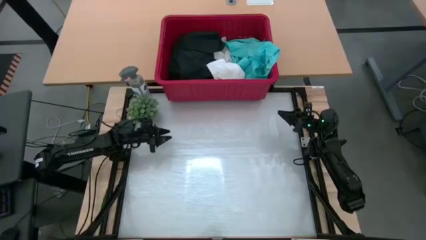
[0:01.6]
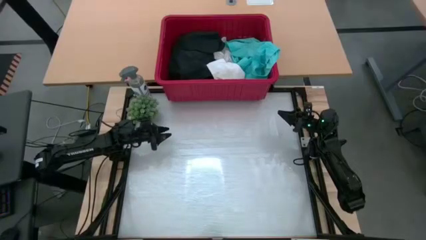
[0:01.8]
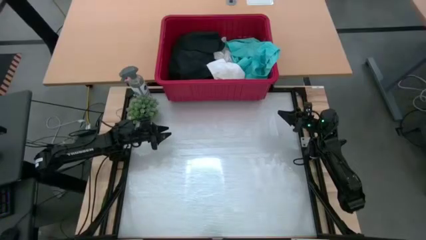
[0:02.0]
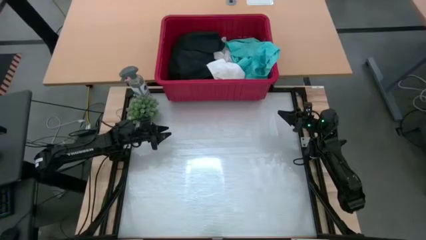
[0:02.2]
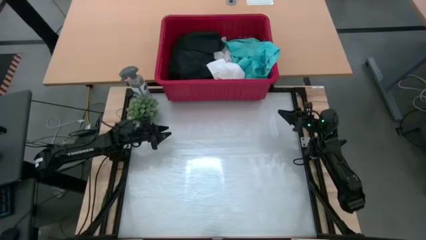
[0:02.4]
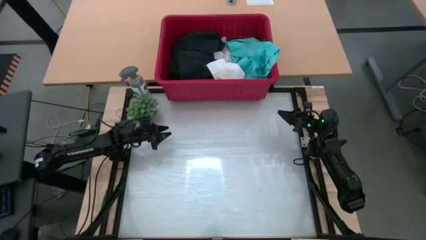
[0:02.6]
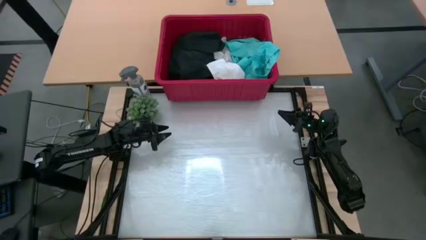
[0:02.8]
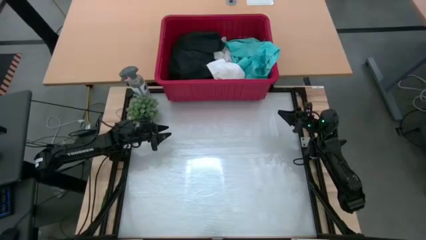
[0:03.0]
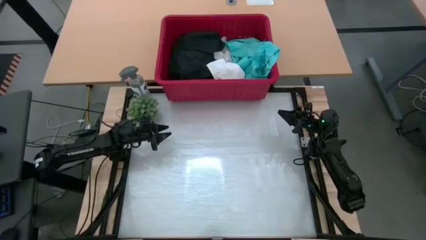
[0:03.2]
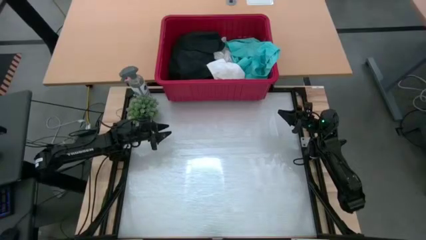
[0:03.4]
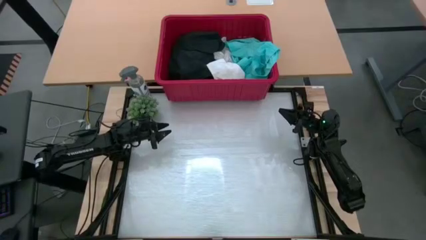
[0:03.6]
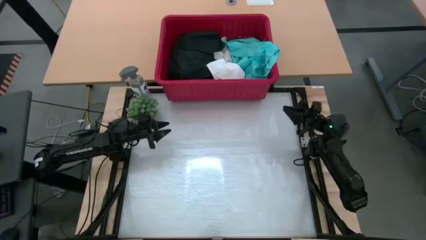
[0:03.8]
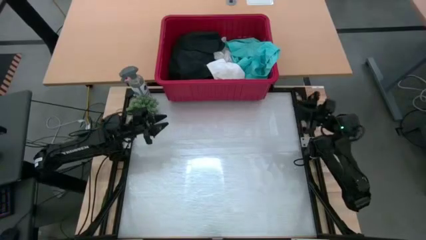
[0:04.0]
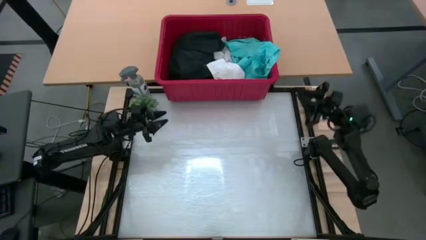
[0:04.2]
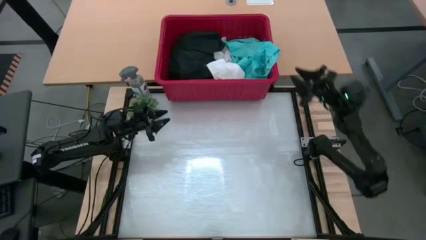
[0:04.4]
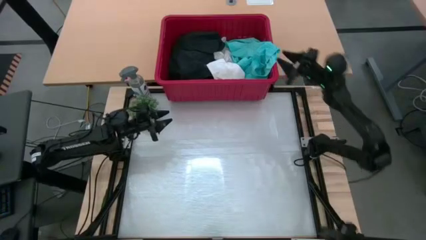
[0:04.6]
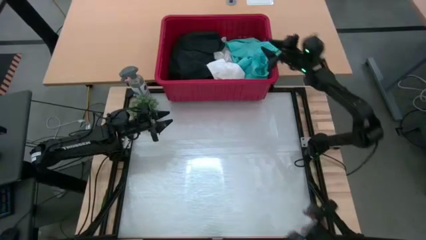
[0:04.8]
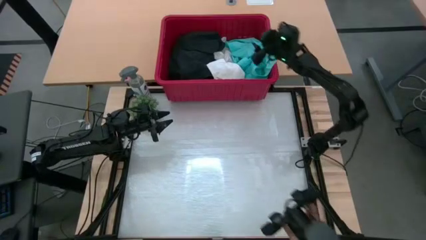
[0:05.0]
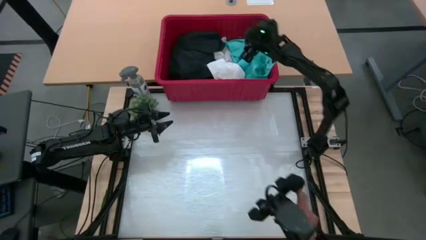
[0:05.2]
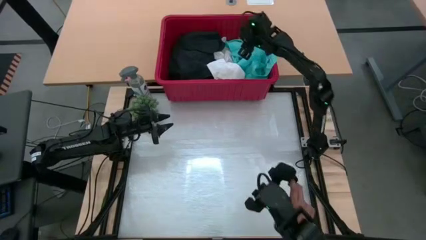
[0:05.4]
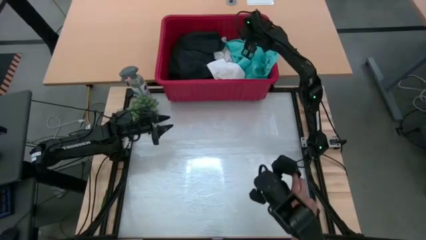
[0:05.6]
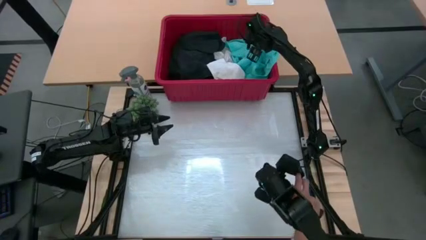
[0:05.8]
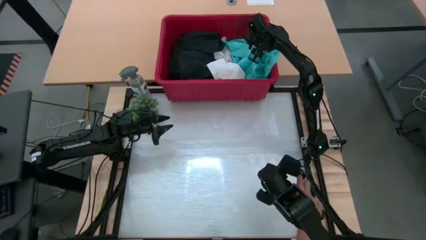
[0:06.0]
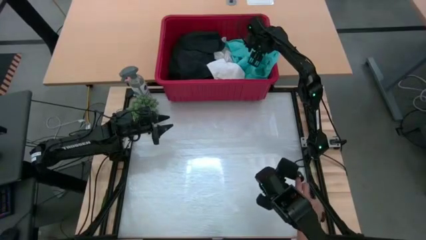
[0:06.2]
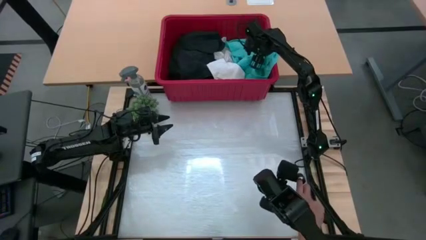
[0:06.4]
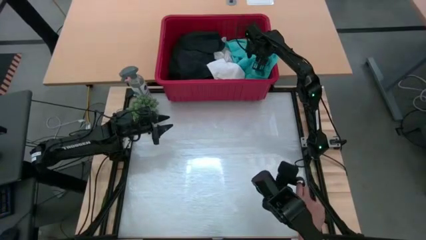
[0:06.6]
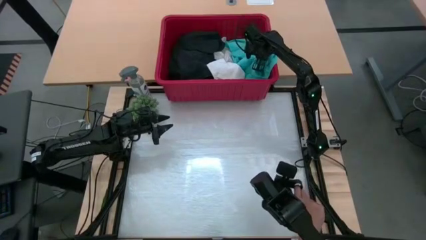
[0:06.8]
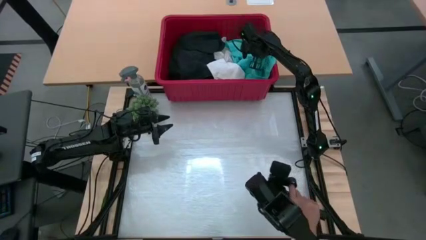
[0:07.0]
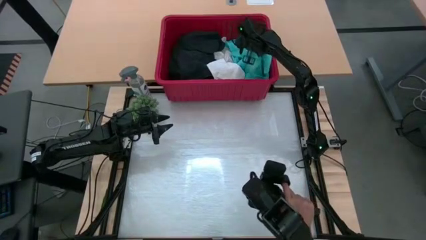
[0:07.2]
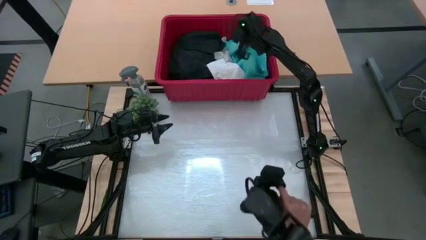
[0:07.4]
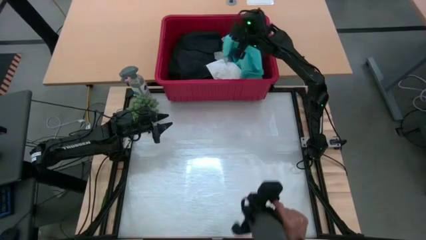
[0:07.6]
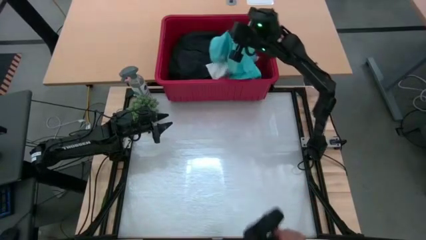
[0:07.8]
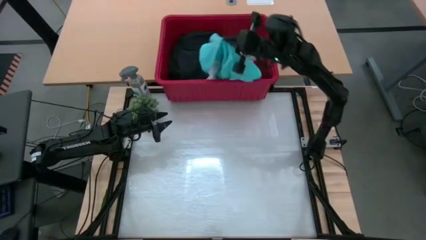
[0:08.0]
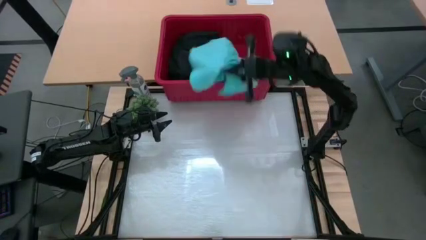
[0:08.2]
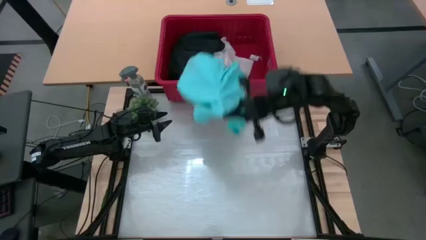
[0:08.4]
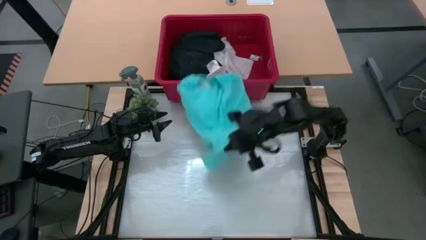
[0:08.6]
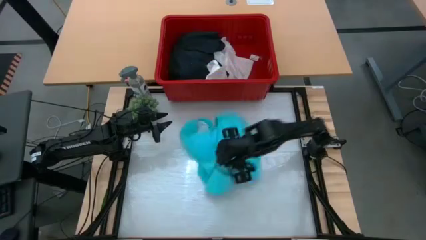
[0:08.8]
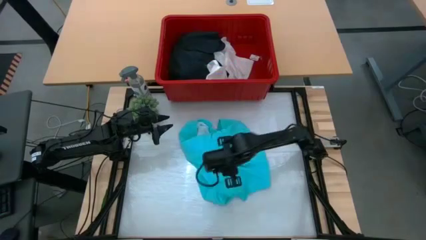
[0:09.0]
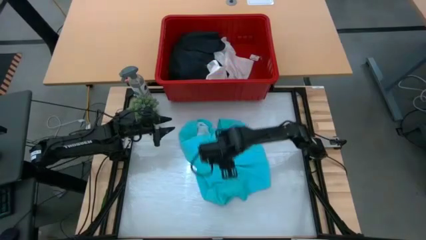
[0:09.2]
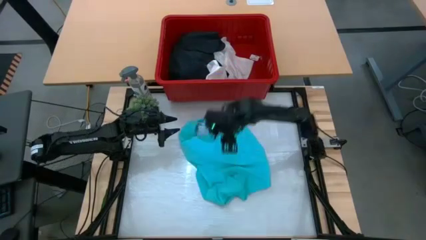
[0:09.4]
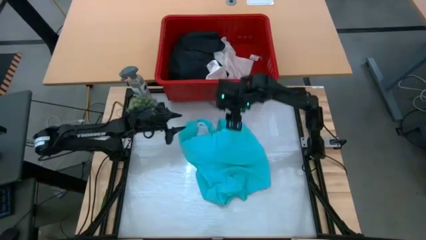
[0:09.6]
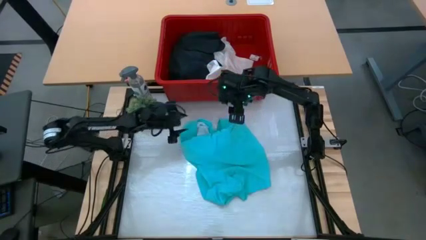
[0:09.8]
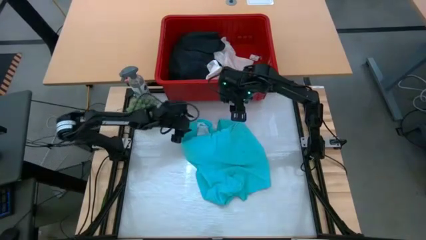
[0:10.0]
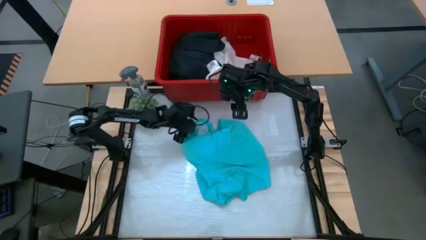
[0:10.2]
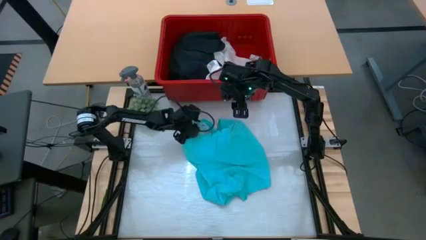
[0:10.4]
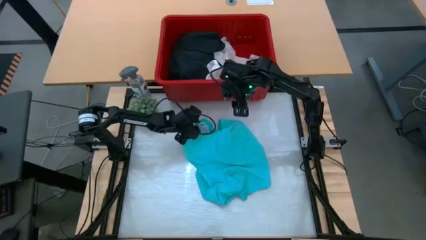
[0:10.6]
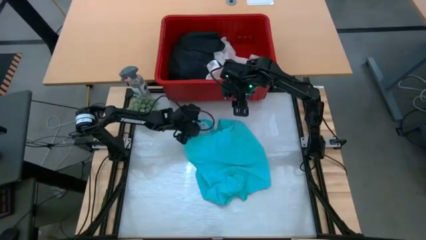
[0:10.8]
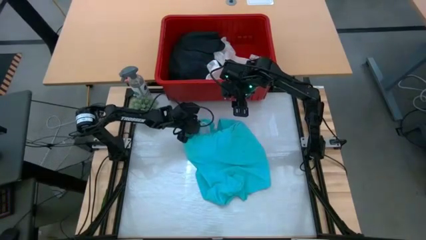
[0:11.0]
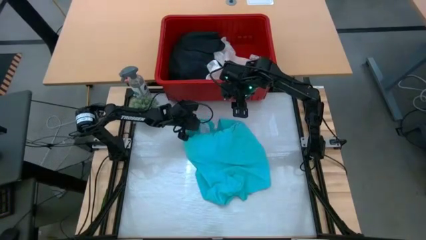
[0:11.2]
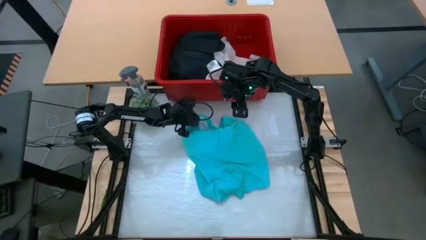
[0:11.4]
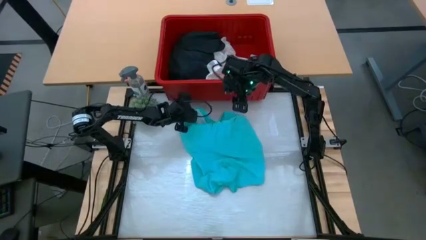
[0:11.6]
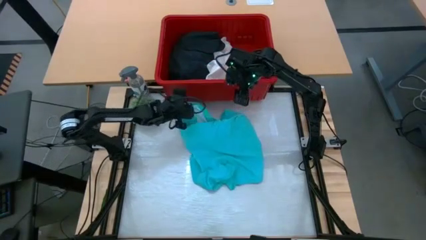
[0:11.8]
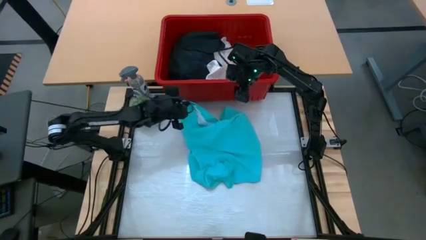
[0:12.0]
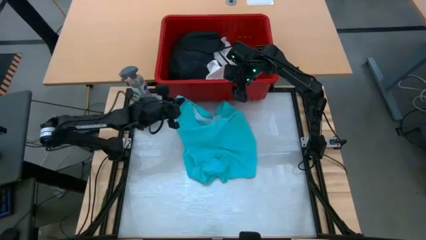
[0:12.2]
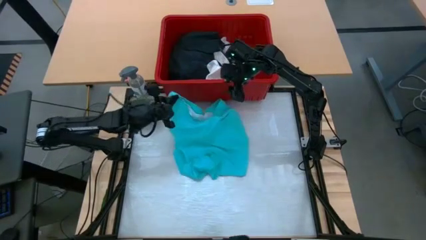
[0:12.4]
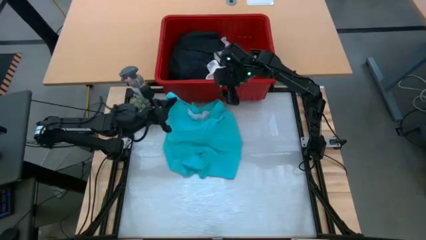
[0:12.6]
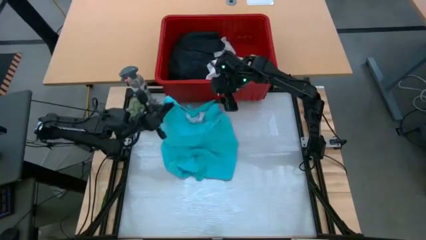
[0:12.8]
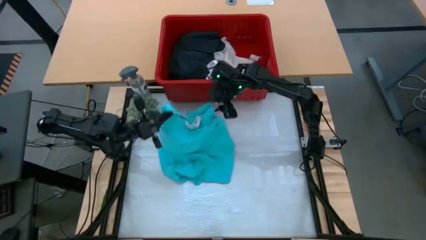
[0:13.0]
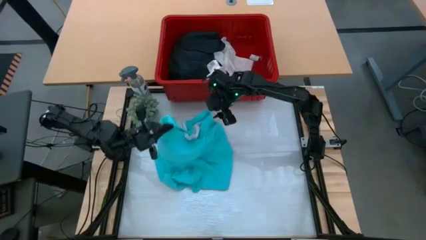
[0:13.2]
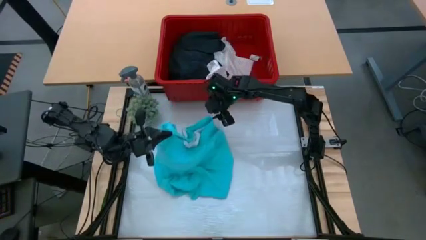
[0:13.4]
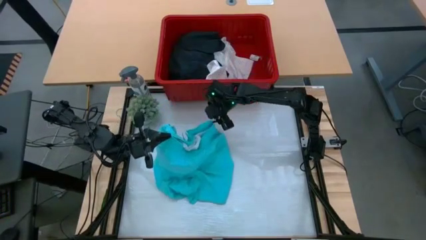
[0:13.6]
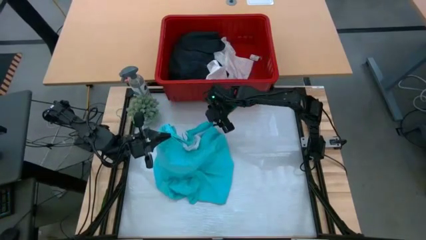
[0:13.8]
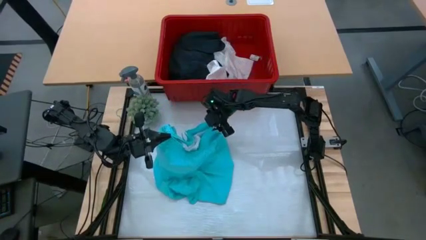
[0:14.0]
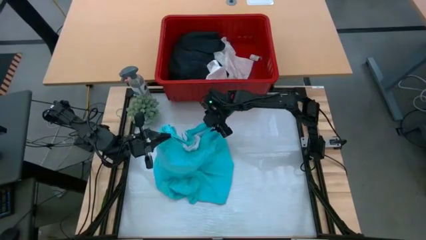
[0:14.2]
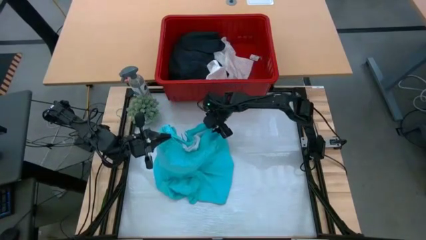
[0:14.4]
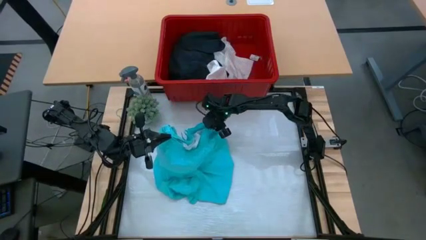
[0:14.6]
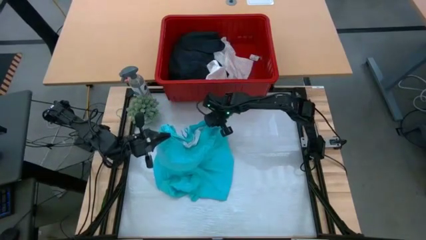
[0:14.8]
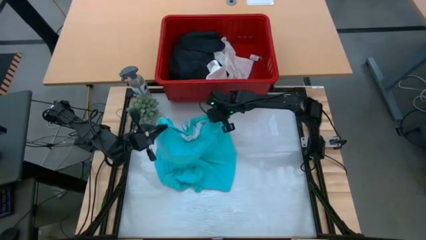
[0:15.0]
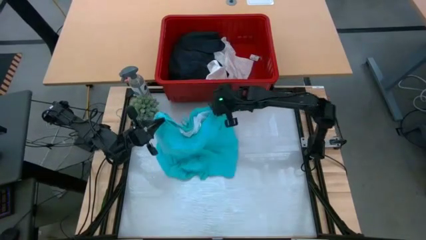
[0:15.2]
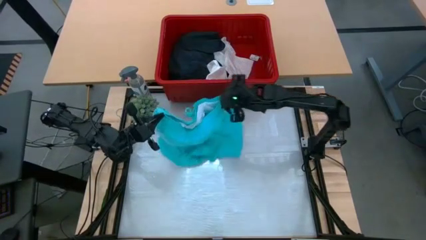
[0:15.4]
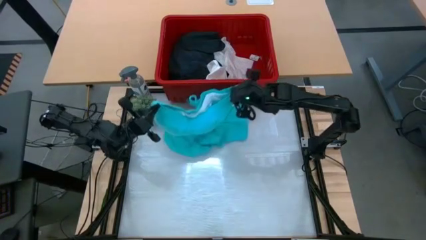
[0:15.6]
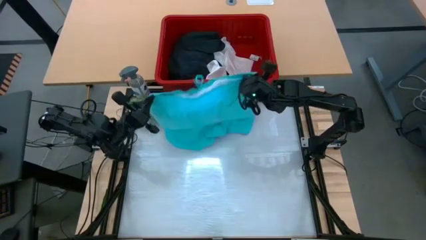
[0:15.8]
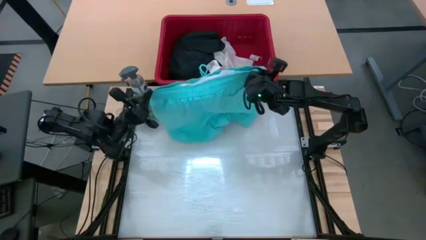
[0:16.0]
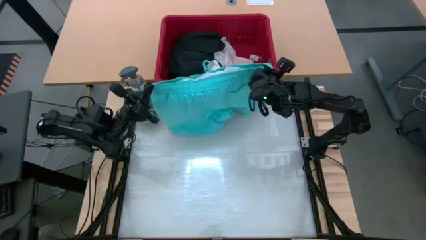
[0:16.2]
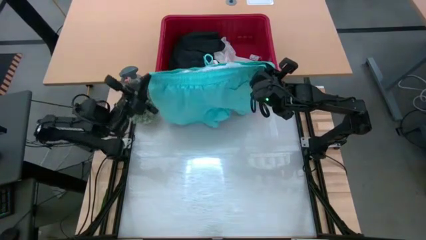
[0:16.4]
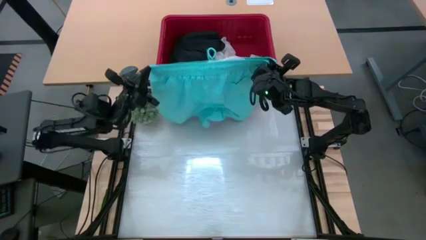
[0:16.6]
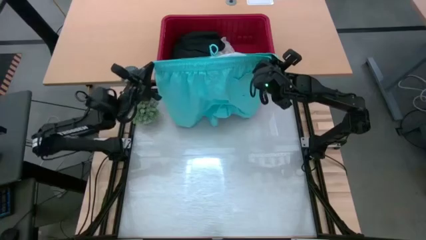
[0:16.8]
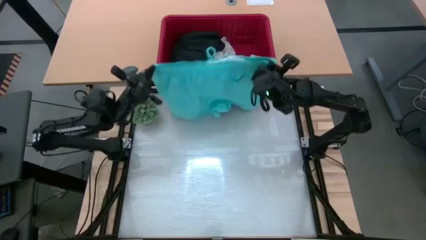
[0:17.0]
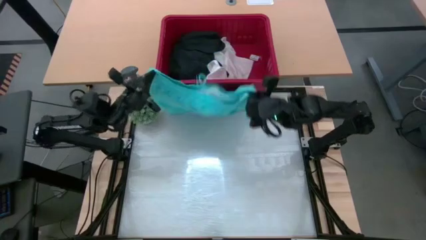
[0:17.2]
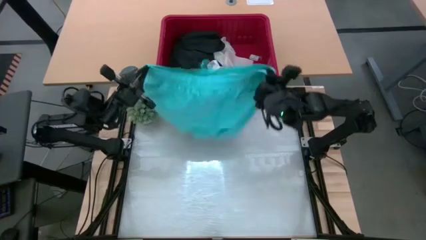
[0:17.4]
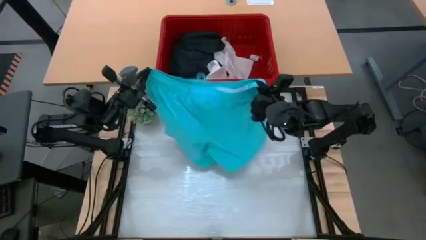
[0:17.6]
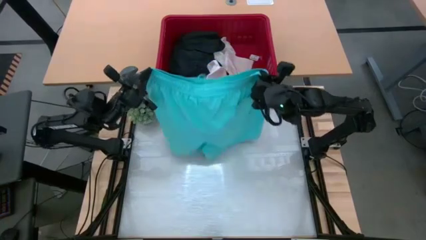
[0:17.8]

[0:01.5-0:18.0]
Task: Fold Laundry from Bin
Fold the blue shorts
